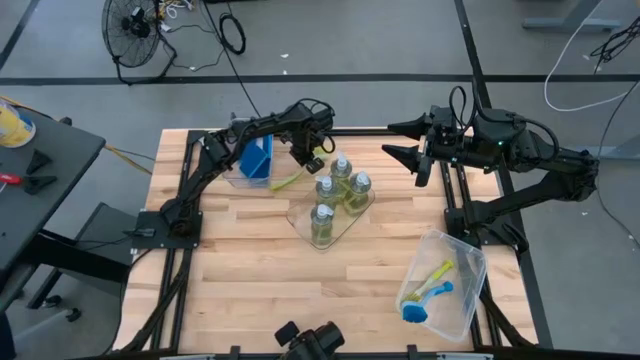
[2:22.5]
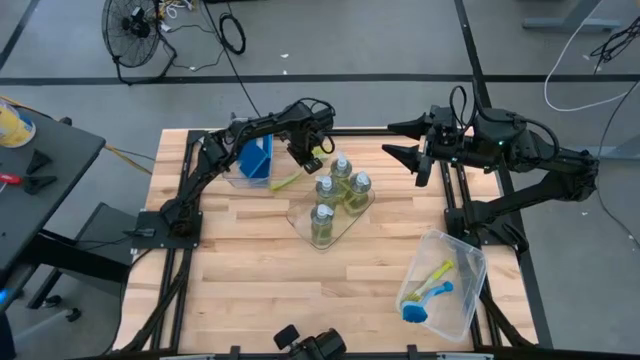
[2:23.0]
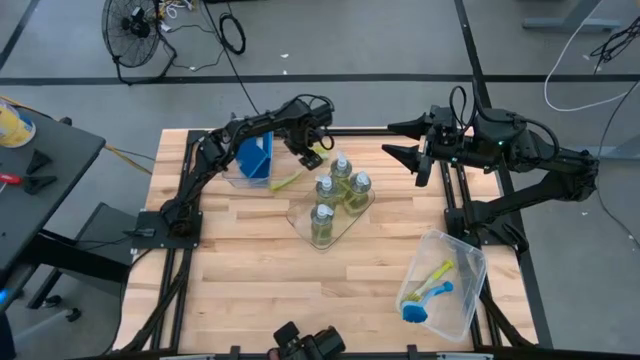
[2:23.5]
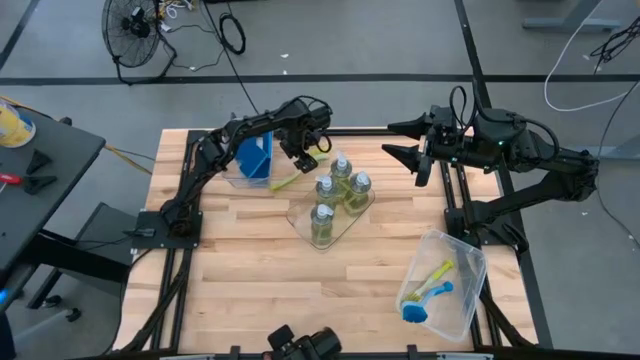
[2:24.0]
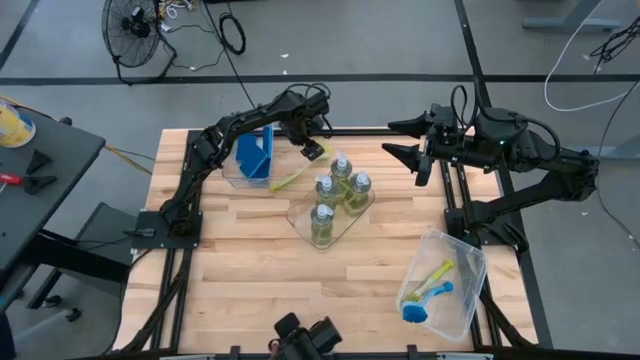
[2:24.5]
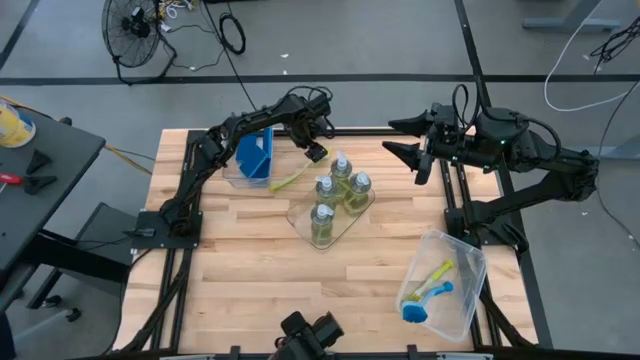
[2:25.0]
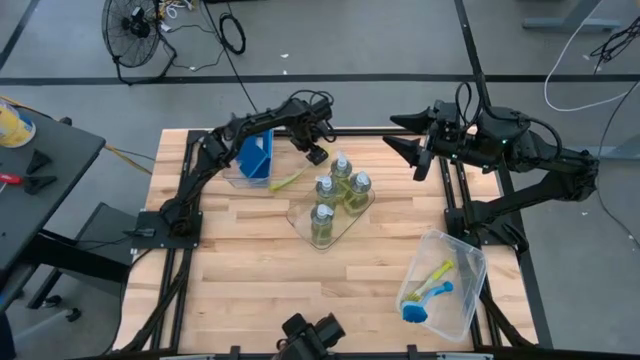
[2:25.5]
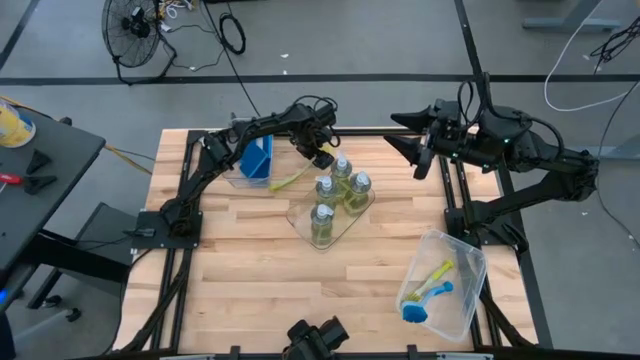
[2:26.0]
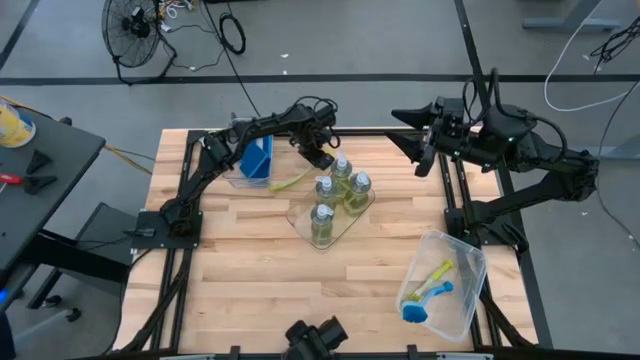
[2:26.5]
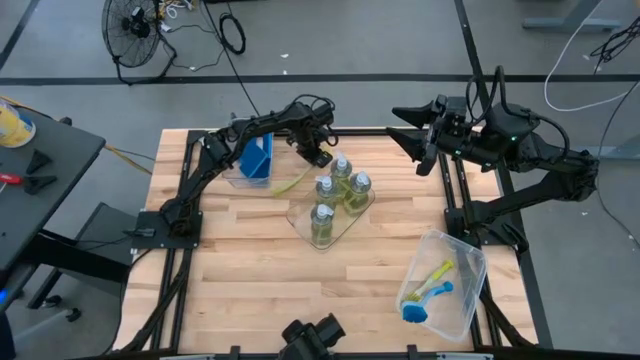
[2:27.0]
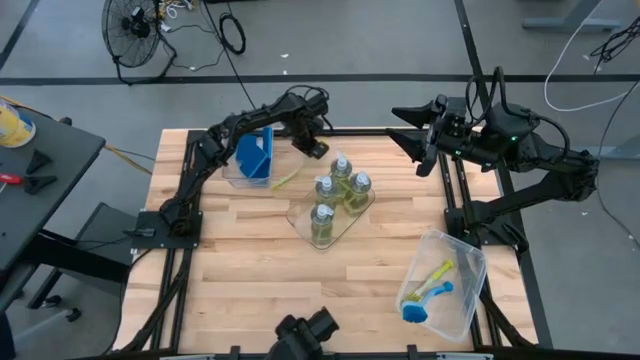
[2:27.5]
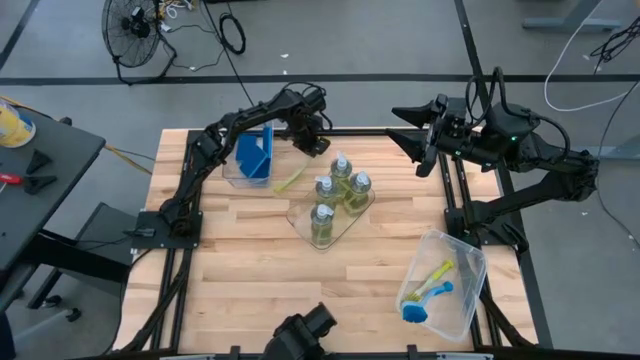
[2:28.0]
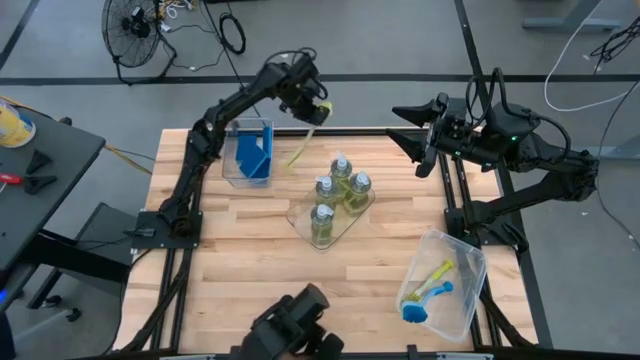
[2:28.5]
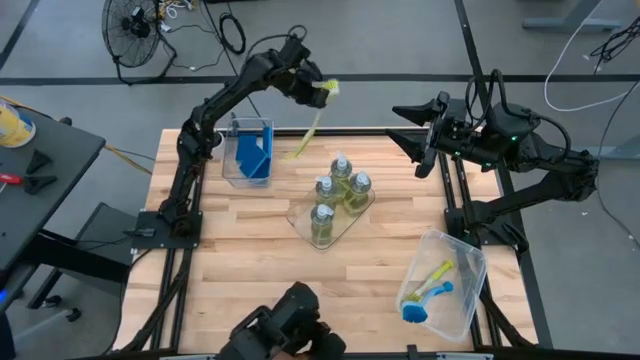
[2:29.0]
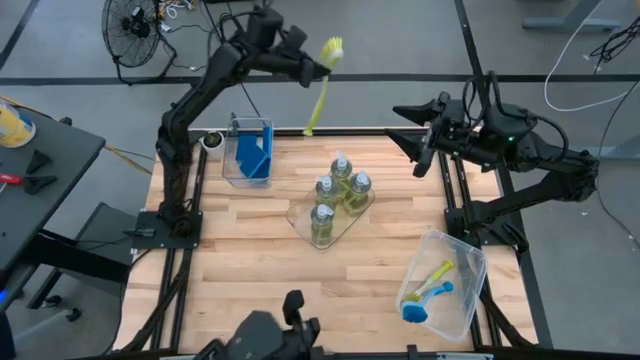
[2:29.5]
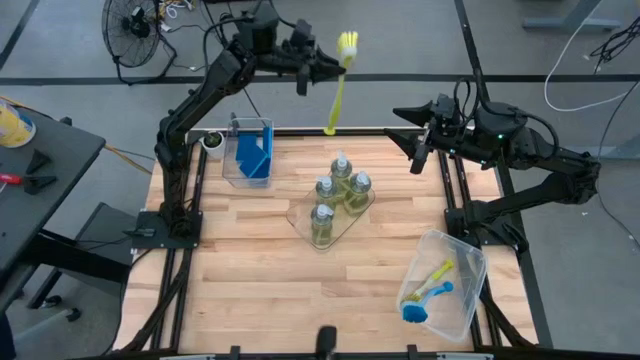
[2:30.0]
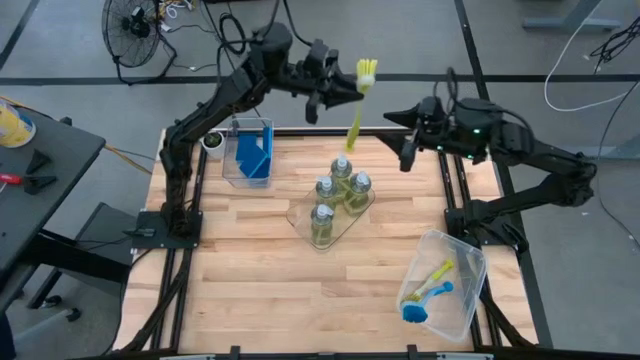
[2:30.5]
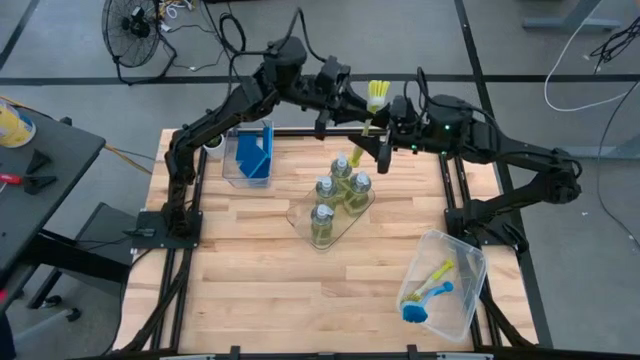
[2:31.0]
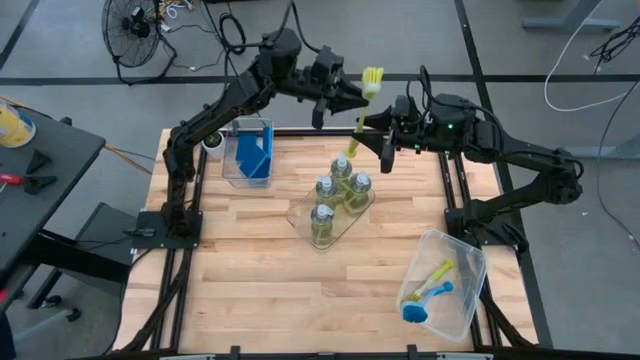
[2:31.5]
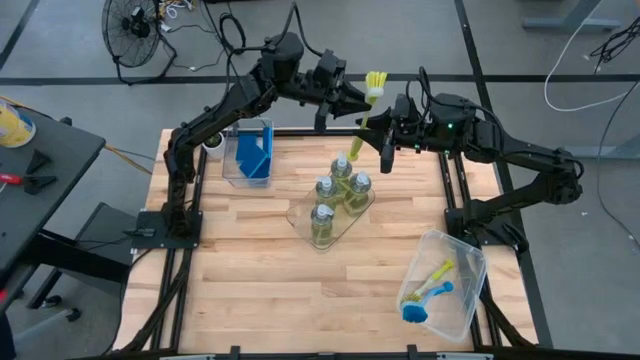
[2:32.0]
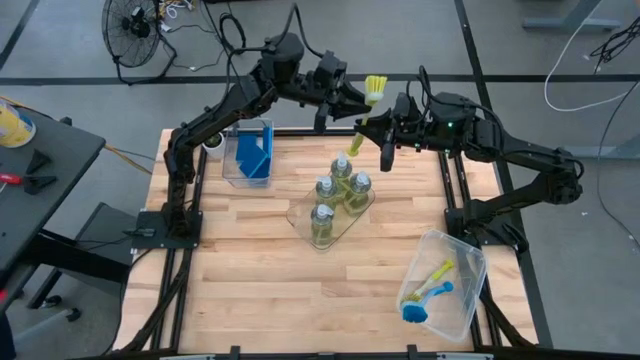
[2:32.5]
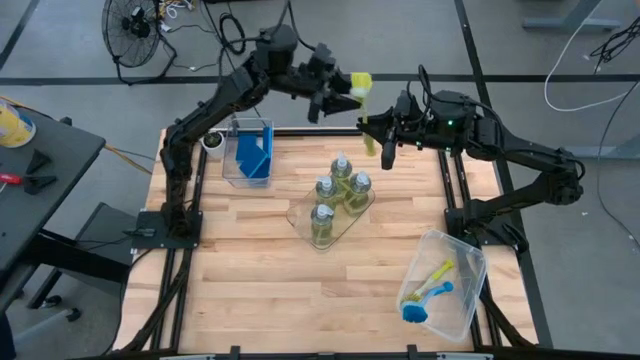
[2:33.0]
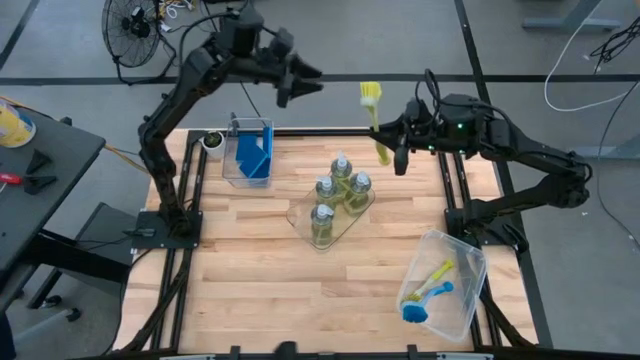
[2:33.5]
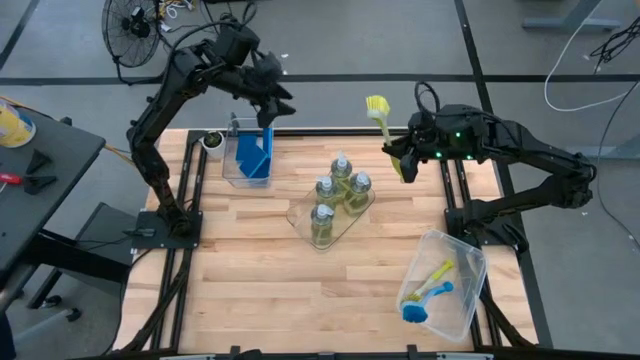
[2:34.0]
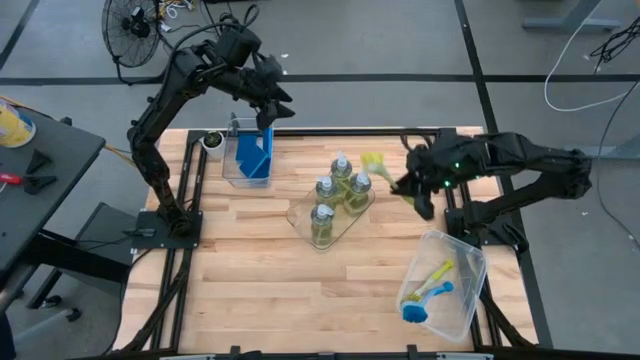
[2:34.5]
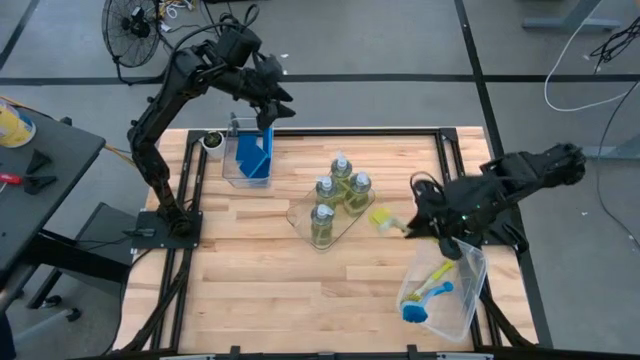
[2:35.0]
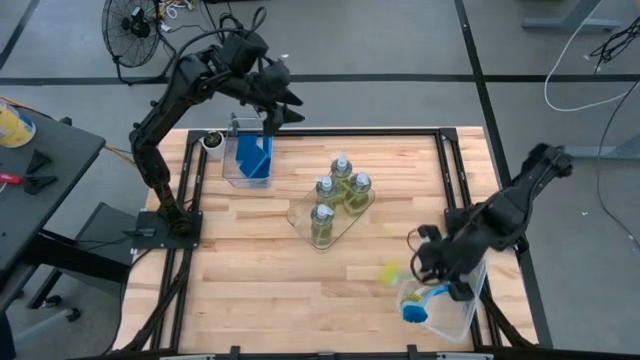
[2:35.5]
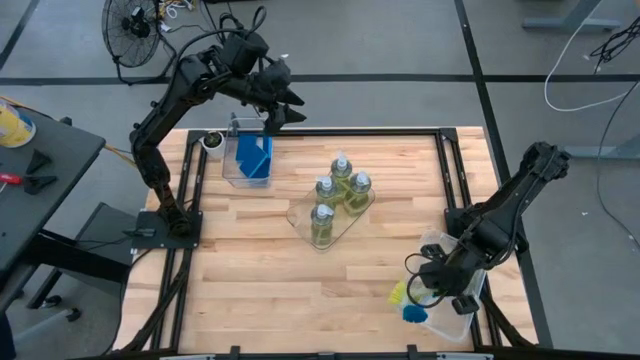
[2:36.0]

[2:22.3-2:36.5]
Task: Pick & Place Kitchen Sink Supplies
Put the yellow toilet brush into the transparent container
